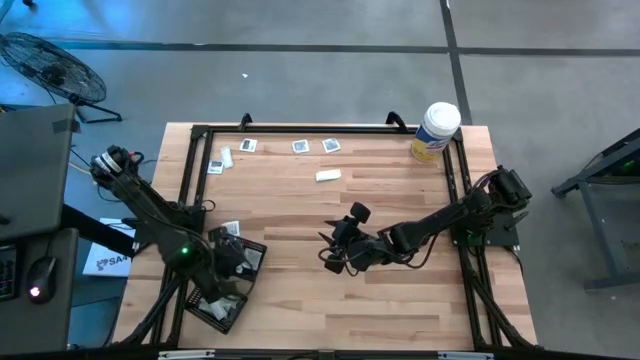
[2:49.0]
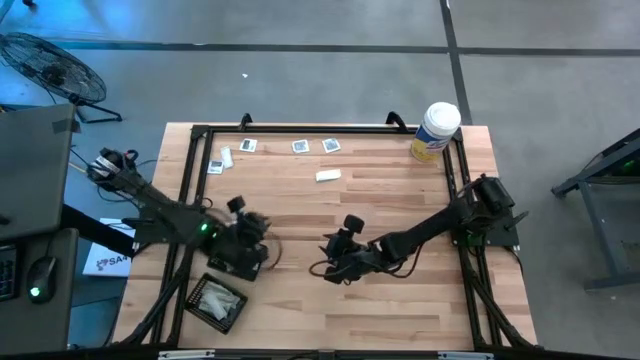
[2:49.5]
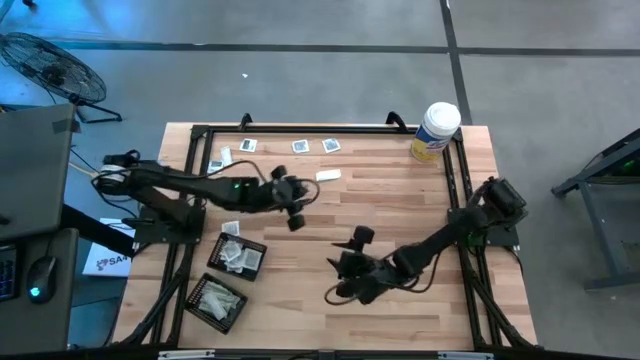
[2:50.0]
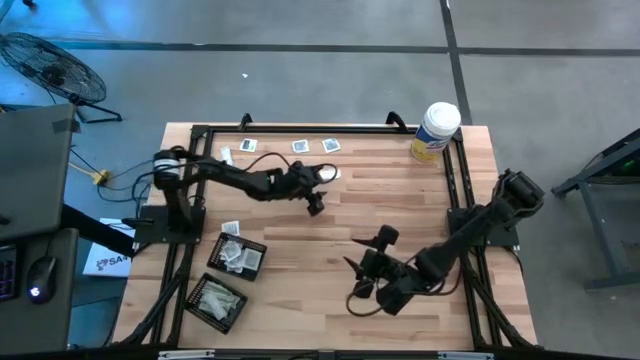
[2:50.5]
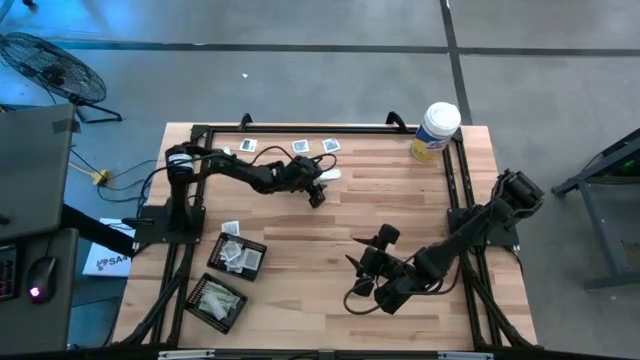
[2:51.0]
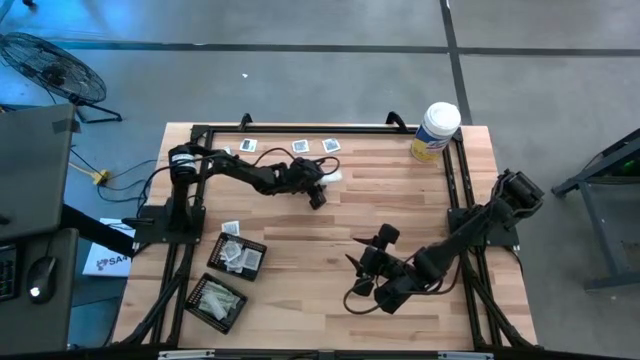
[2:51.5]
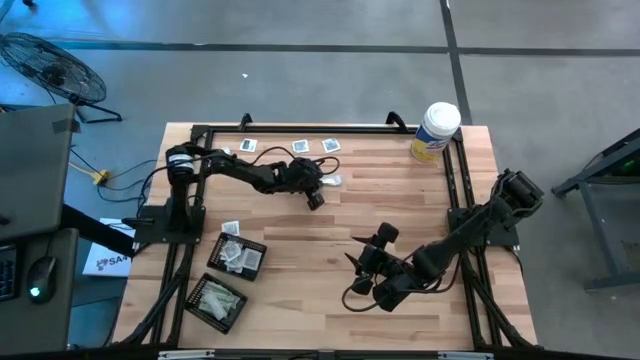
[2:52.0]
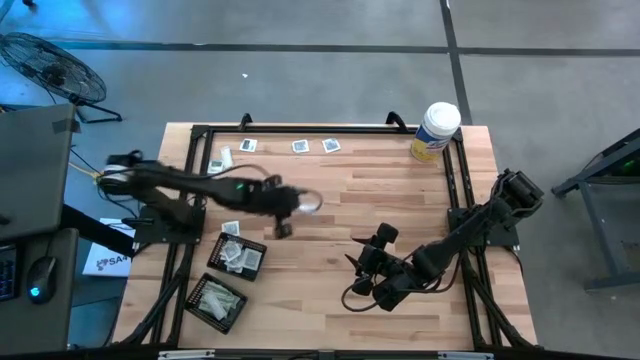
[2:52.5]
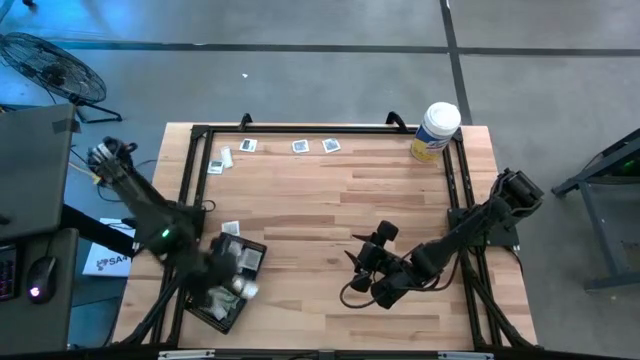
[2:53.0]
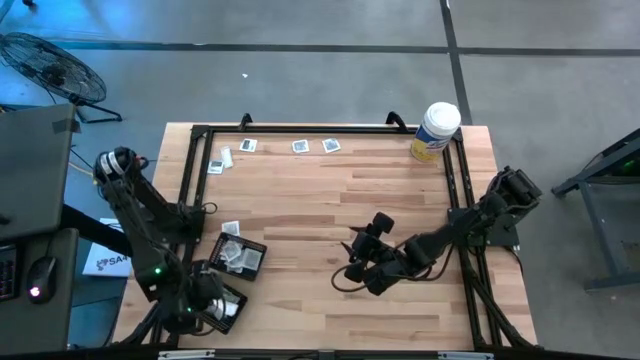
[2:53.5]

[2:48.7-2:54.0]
Task: Pick & Place First Aid Supplies
Put the bandage into the bottom black bin

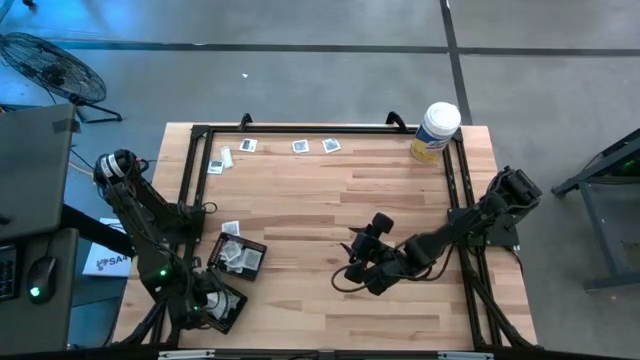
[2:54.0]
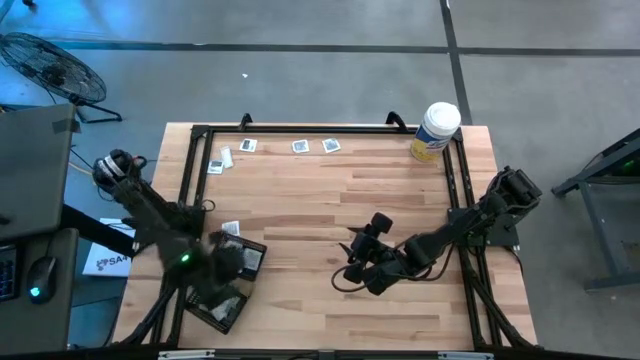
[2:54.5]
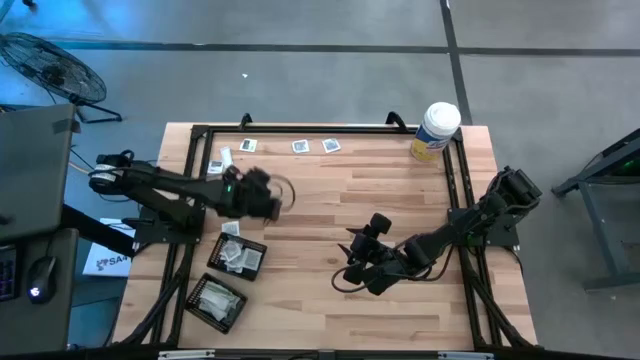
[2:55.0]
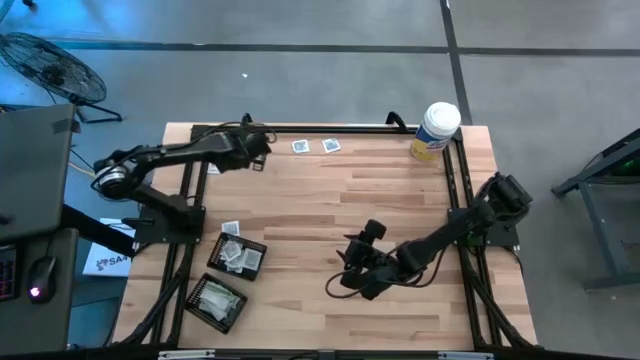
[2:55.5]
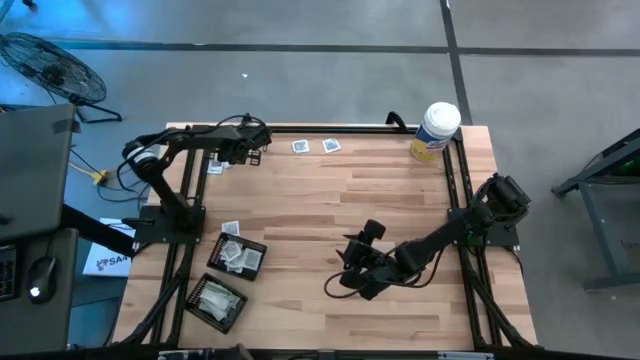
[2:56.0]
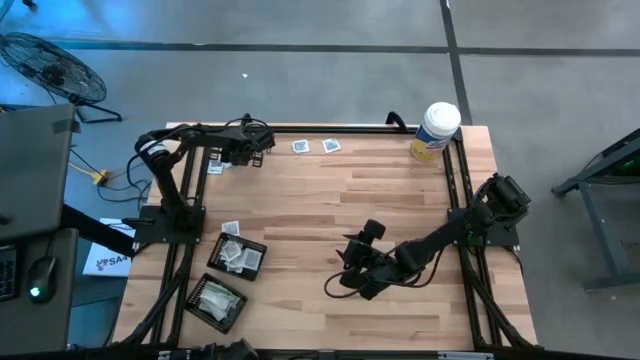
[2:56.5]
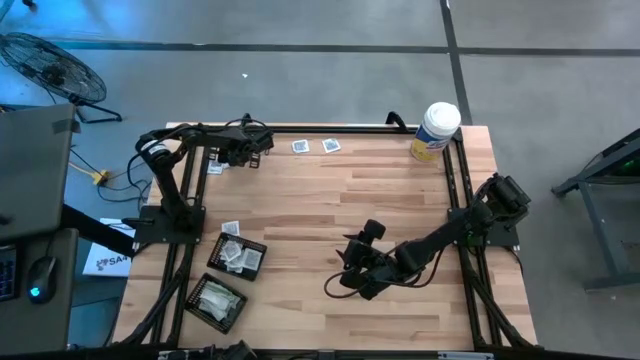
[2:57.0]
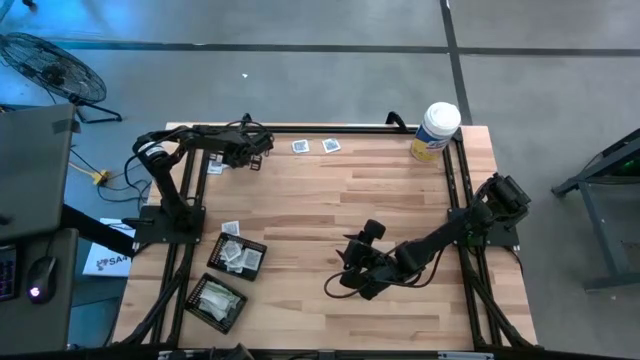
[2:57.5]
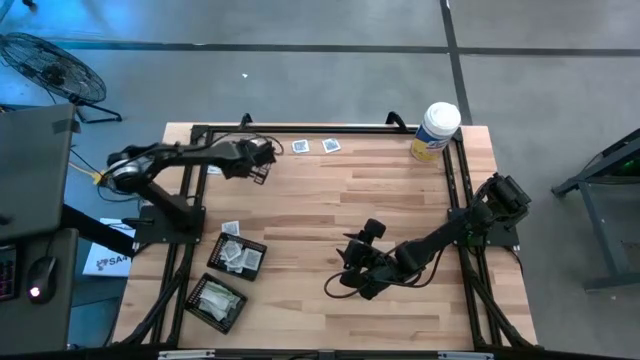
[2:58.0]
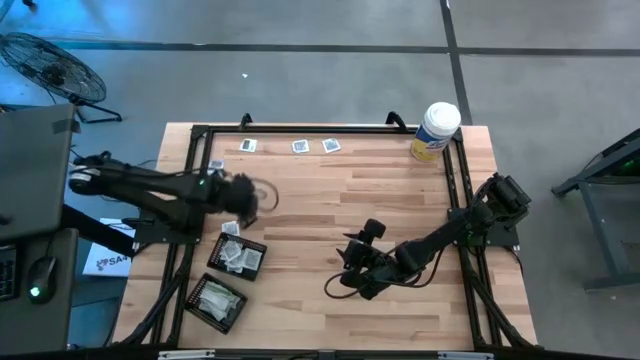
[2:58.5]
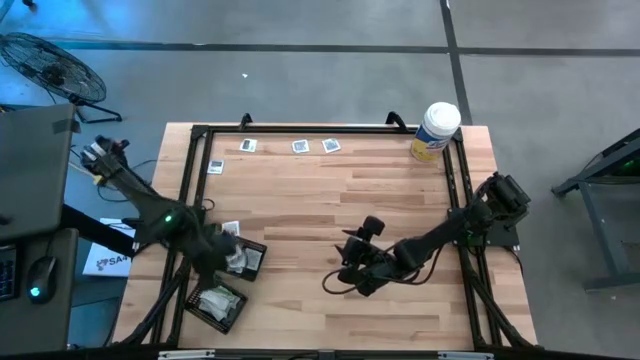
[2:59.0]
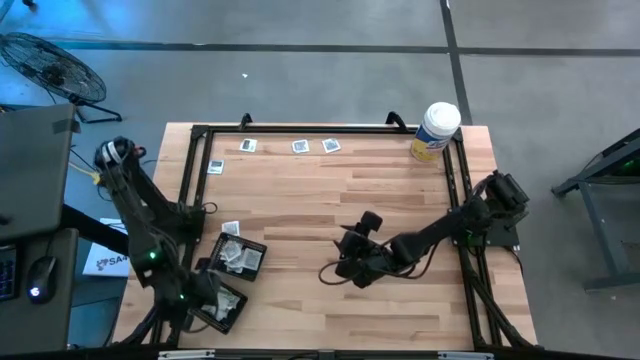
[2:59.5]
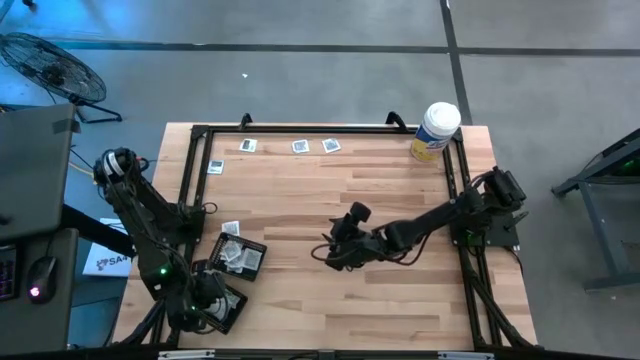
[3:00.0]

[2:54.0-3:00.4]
Put the bandage into the bottom black bin

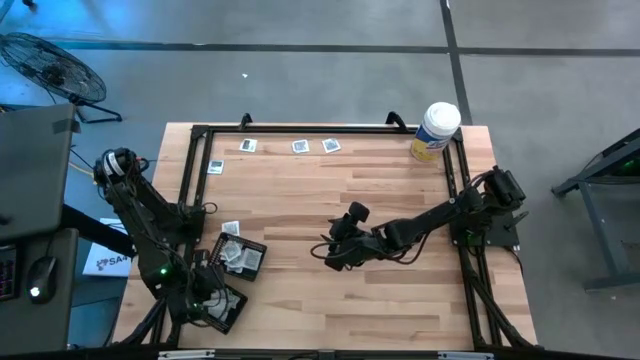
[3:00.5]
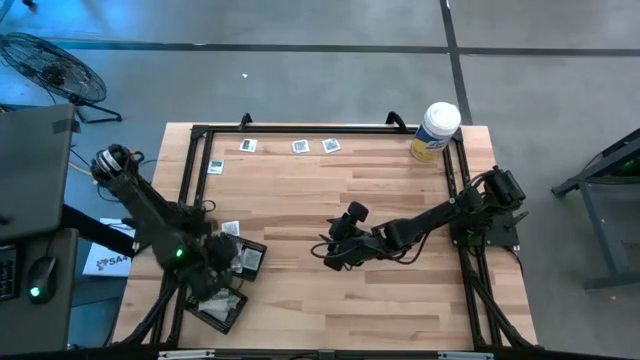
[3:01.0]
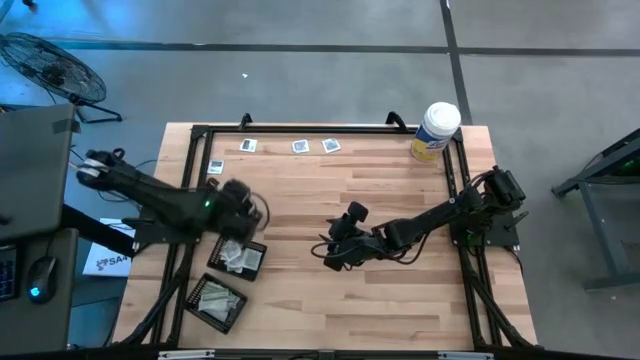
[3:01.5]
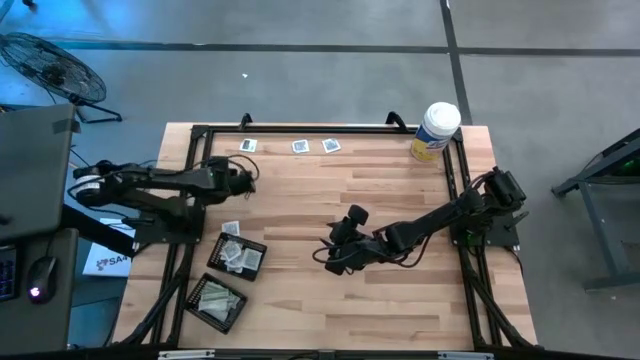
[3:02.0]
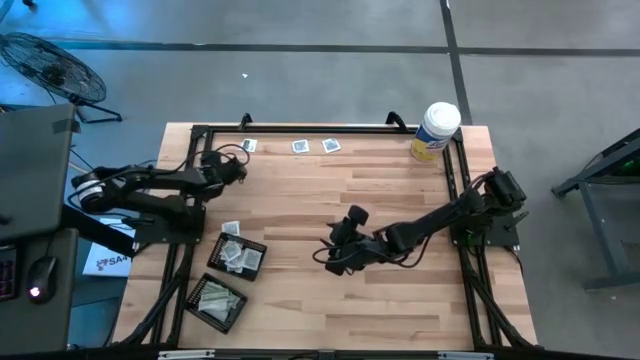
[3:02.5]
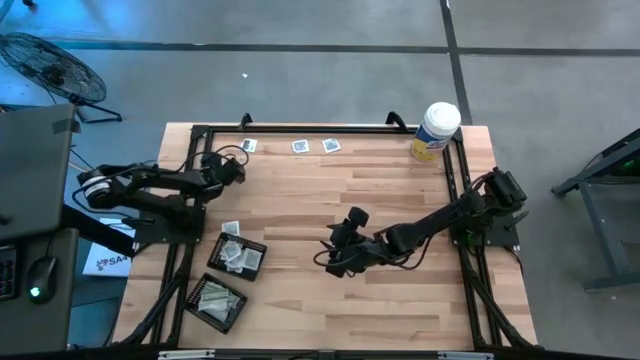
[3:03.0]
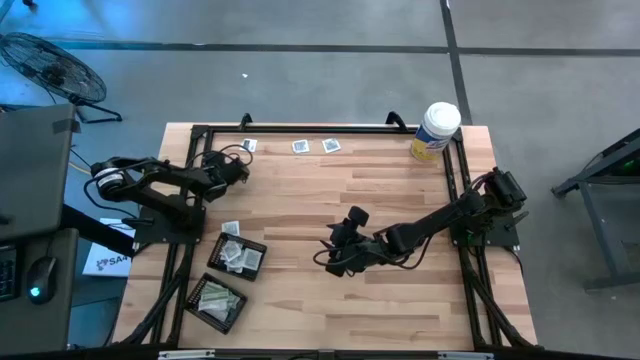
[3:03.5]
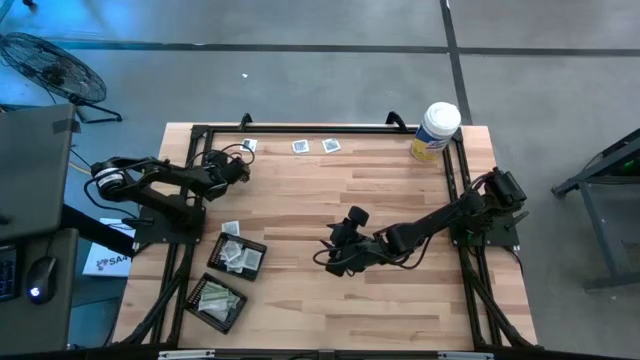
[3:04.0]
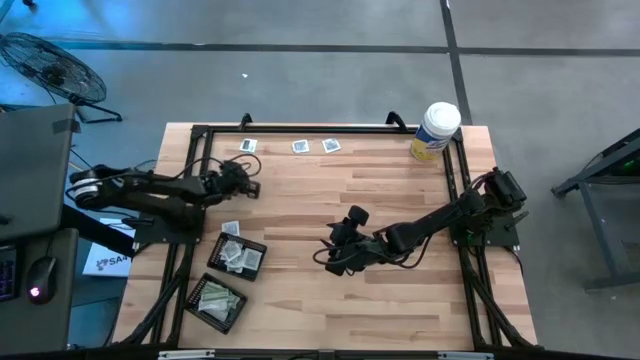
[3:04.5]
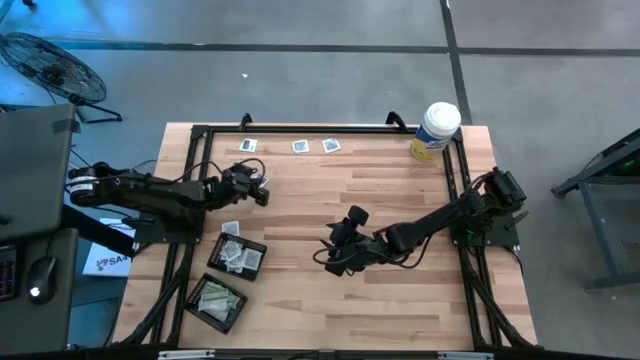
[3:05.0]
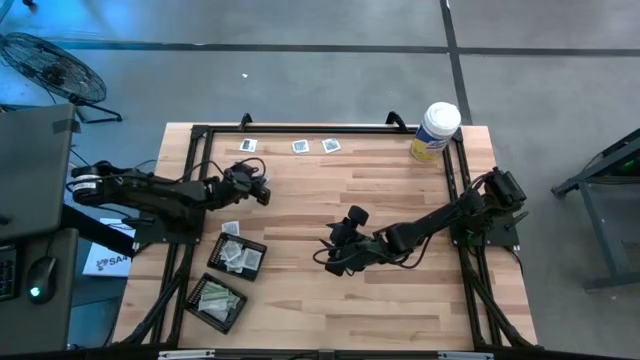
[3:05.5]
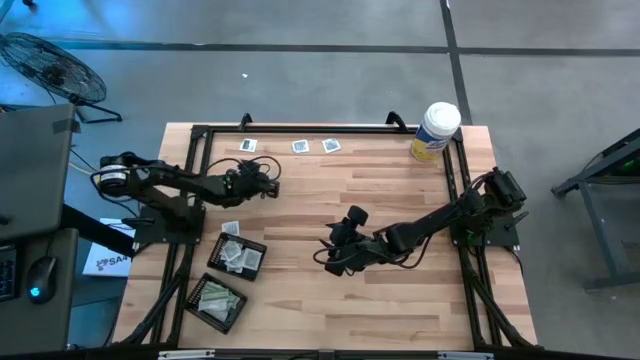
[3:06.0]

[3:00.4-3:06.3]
Put the towelette pack into the top black bin

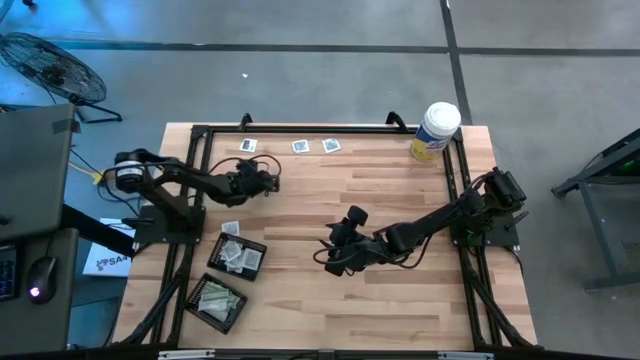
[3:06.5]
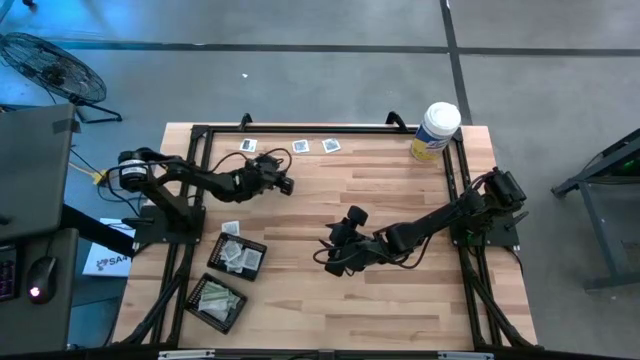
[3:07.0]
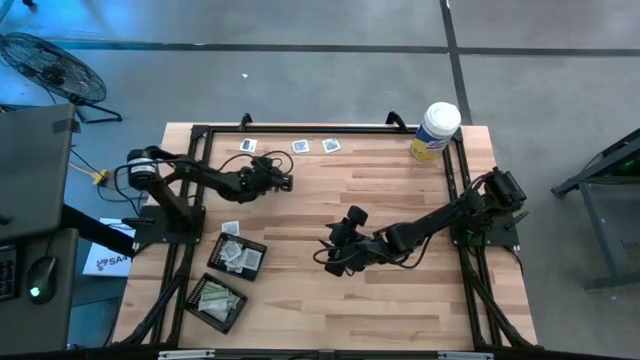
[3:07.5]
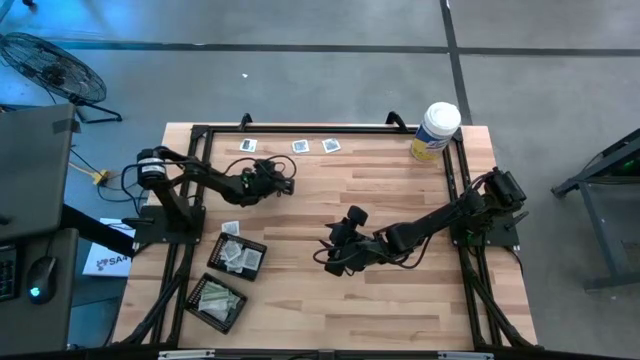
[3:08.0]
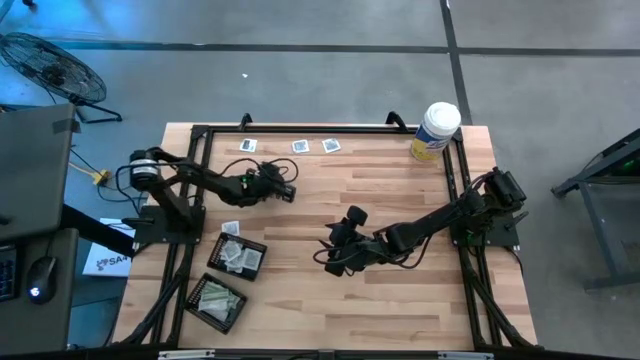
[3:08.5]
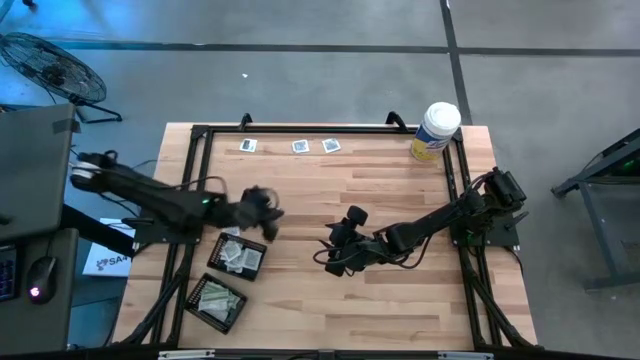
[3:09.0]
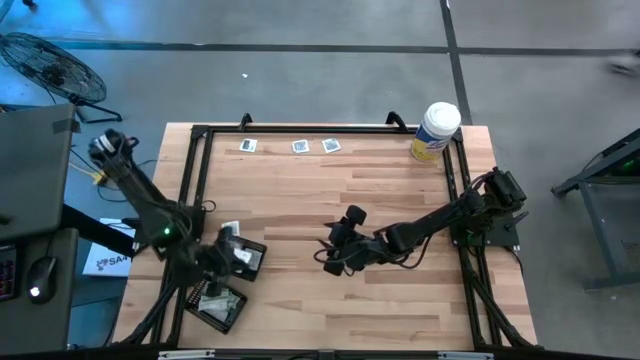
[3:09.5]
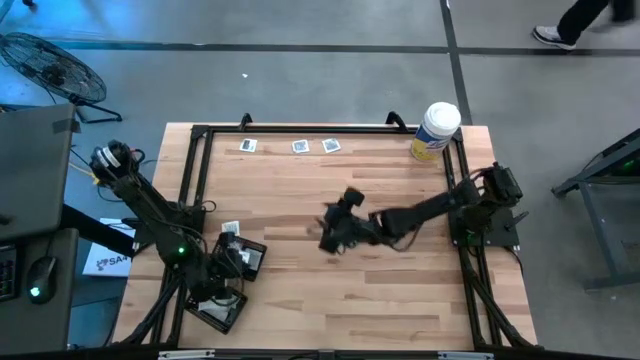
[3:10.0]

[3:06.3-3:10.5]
Put the towelette pack into the top black bin
